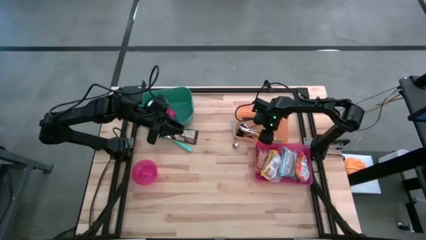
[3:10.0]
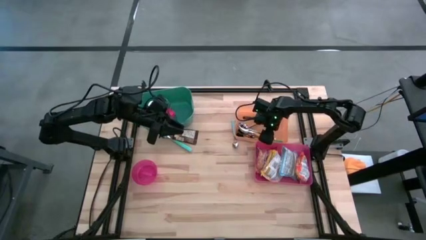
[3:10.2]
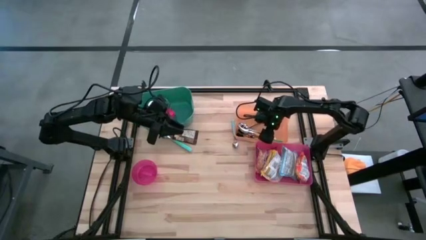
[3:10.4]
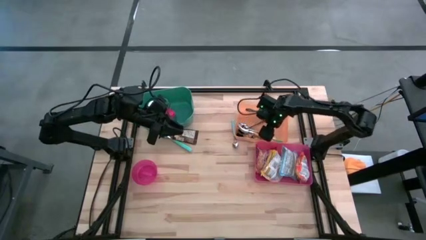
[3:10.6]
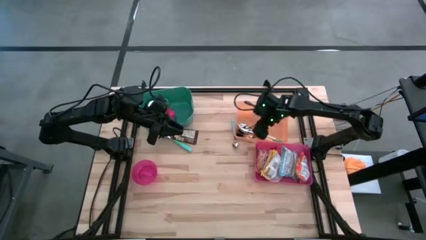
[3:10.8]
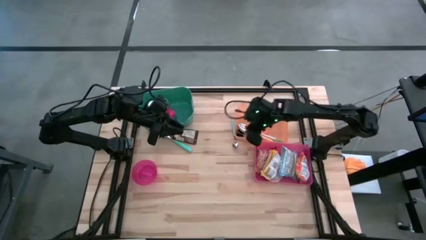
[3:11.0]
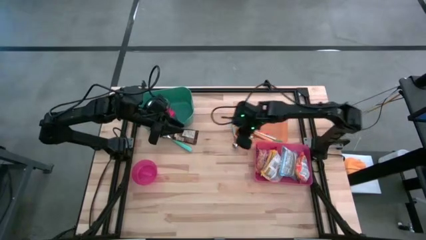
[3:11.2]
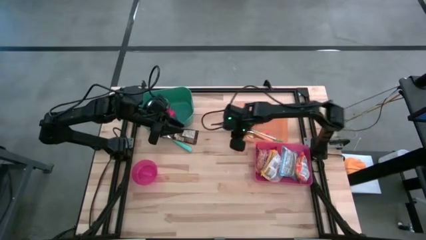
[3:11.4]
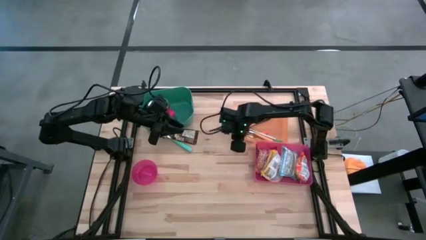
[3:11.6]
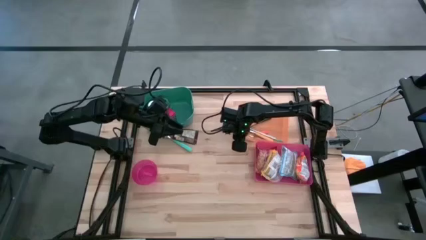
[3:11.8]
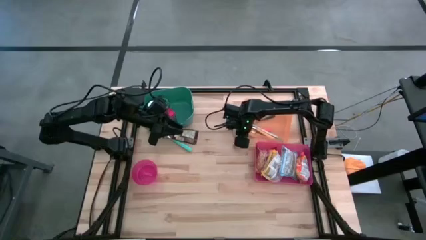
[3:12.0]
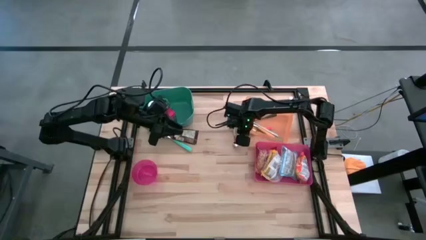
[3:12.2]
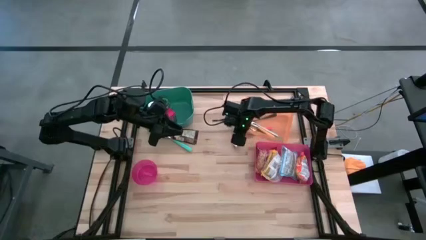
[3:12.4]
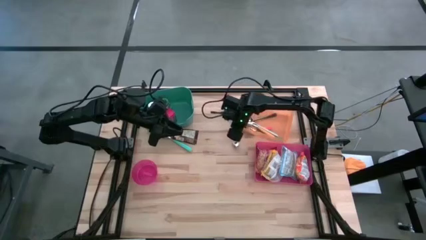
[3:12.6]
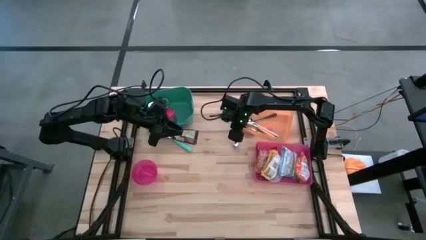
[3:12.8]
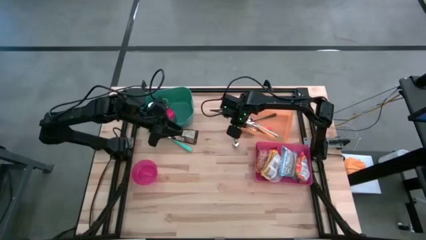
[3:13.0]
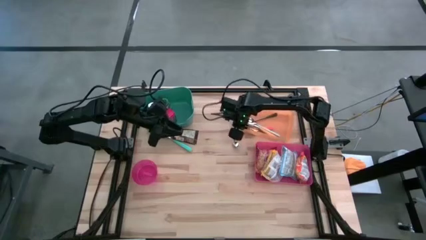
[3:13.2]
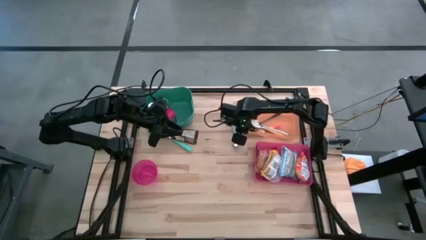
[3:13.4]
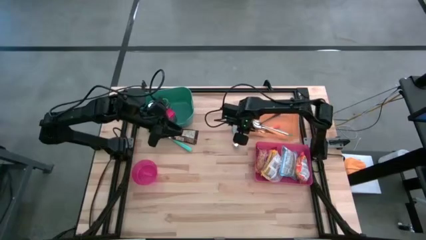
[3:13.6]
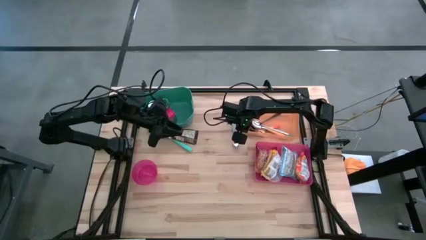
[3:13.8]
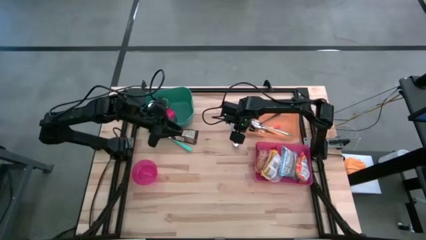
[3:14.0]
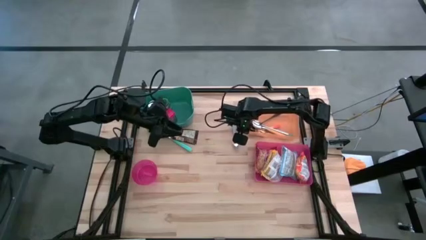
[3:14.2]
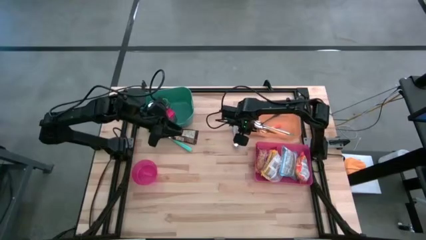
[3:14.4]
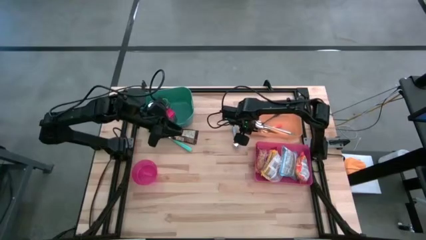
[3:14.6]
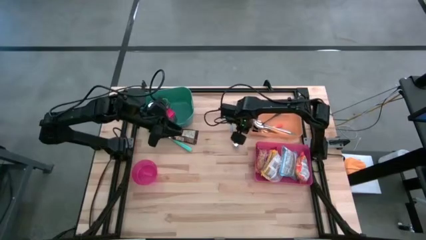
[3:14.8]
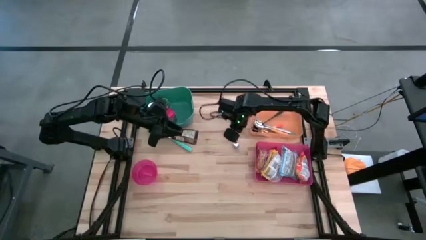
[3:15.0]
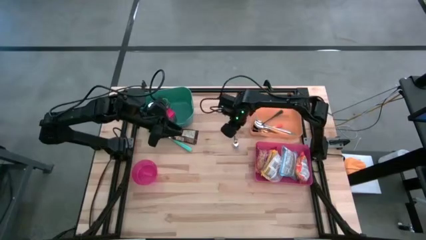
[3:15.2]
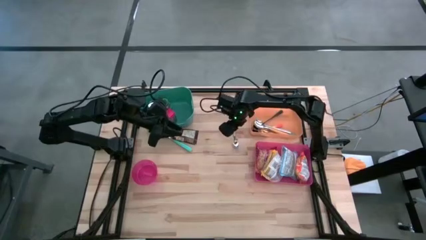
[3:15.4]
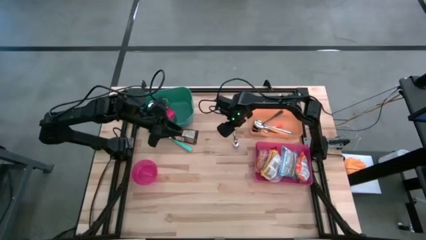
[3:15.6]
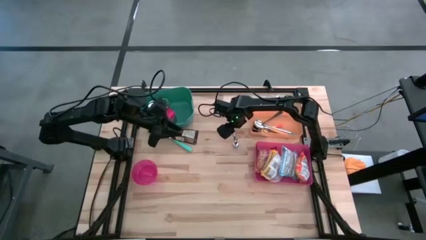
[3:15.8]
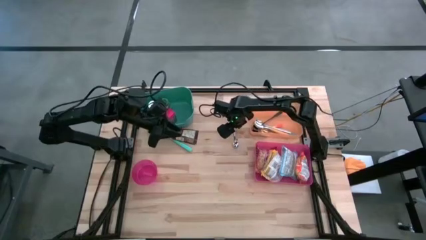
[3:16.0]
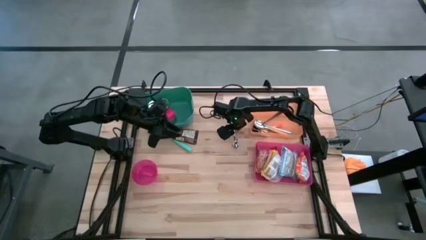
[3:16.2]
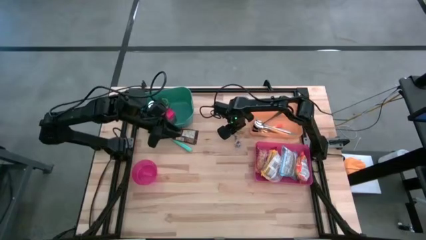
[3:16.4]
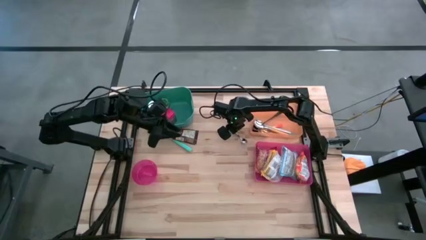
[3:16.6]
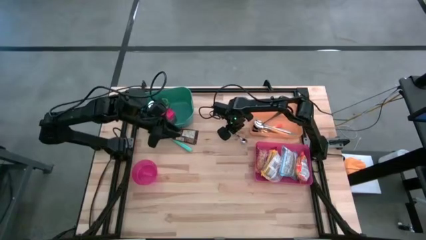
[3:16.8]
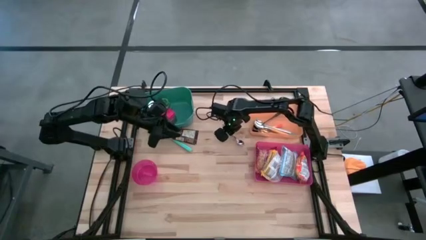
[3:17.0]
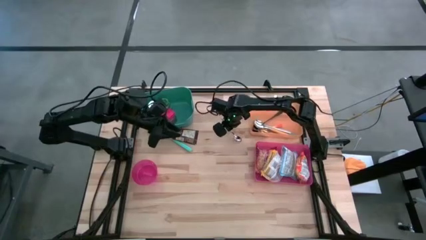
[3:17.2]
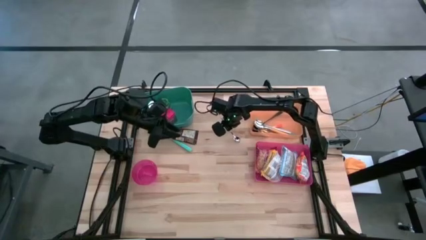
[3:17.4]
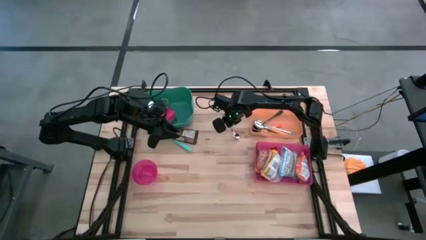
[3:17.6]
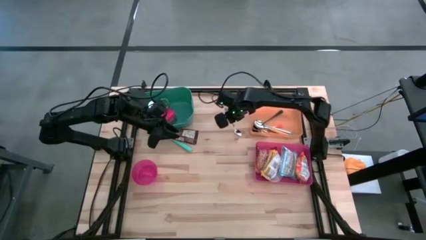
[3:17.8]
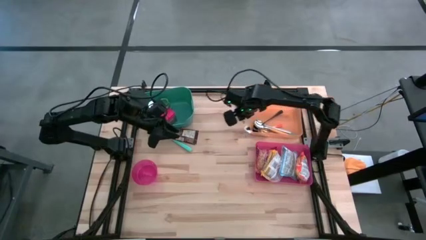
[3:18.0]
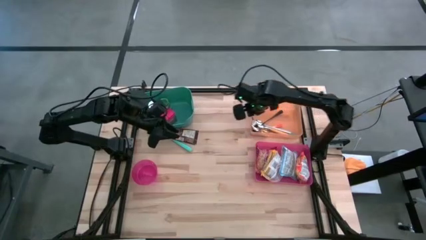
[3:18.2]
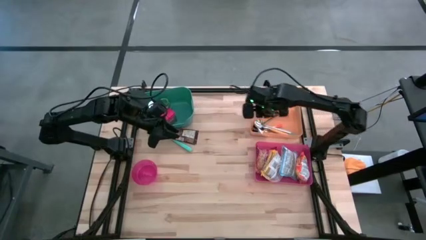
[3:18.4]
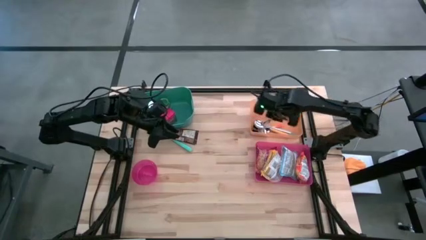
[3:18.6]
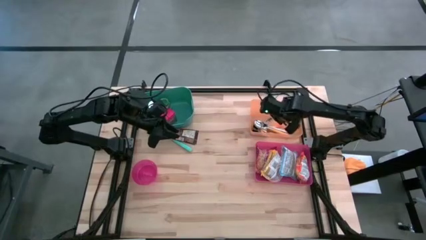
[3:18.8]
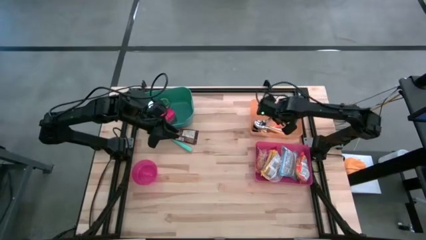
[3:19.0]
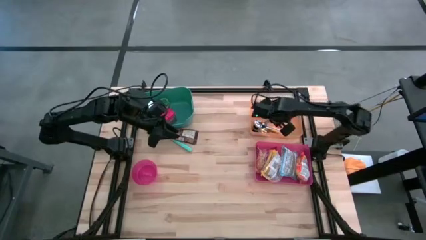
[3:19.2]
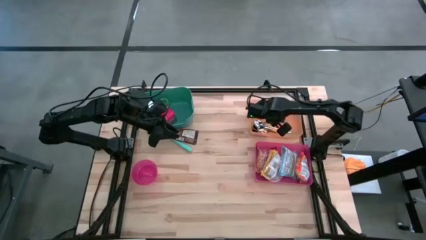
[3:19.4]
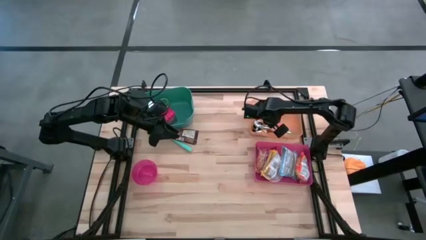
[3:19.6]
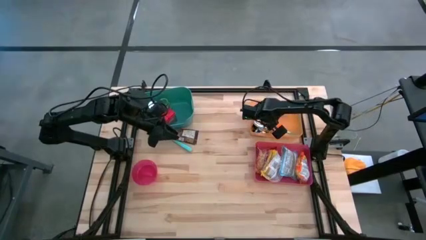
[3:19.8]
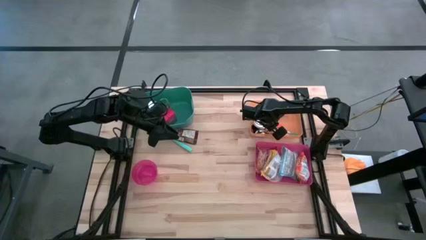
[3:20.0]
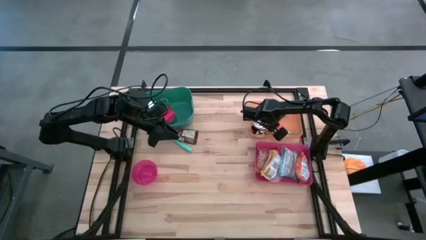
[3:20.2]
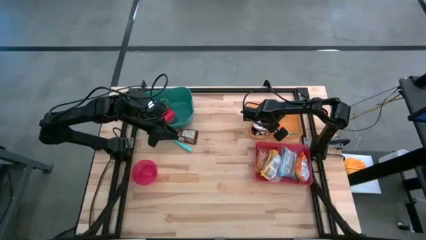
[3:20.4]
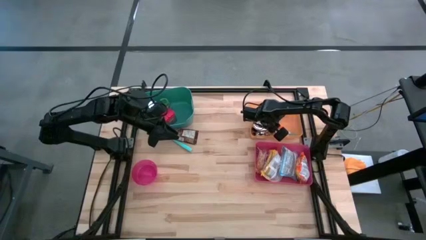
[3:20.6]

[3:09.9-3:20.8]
Put the blue spoon into the orange bin
